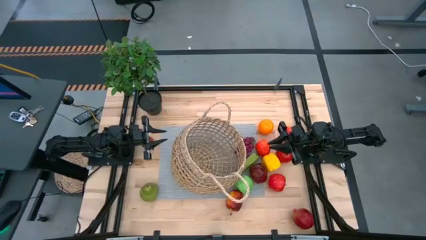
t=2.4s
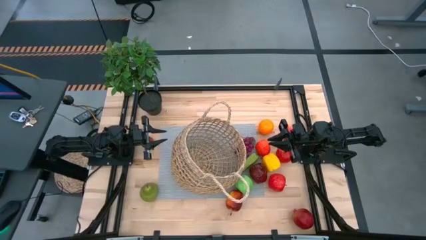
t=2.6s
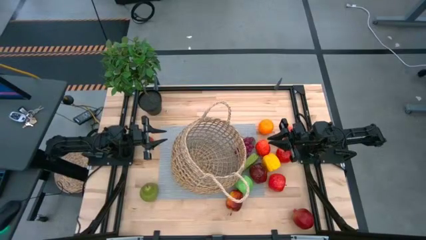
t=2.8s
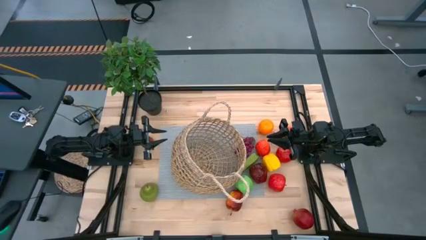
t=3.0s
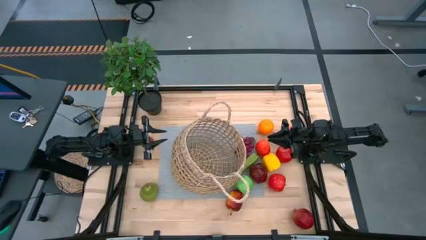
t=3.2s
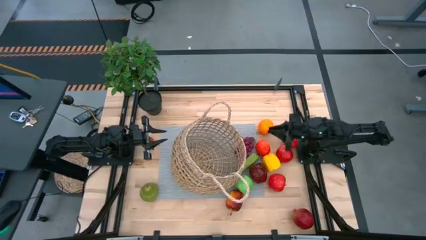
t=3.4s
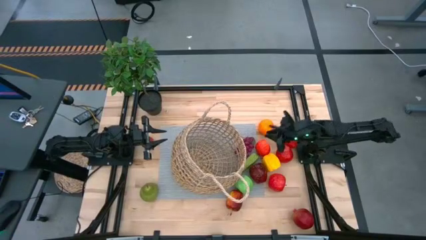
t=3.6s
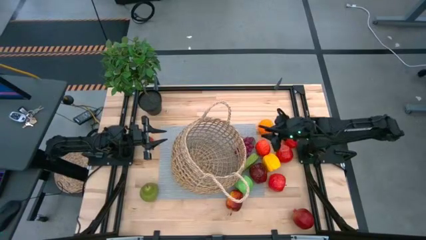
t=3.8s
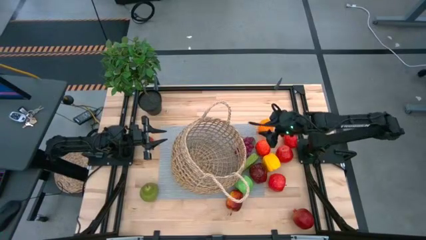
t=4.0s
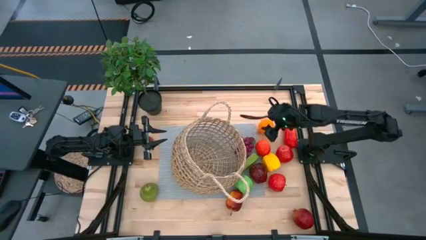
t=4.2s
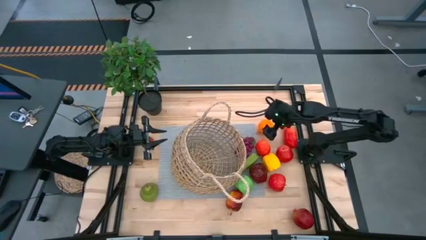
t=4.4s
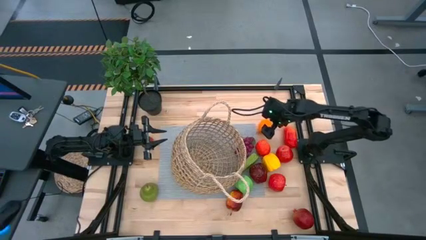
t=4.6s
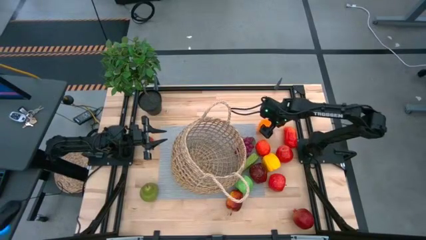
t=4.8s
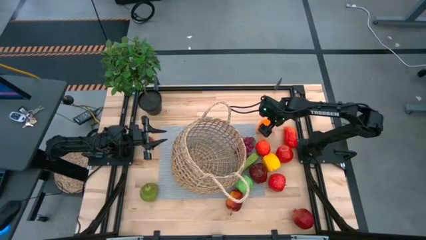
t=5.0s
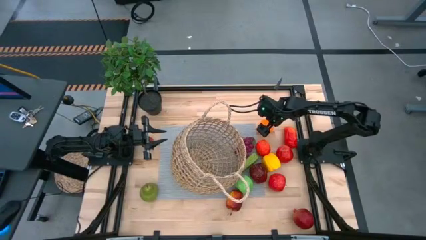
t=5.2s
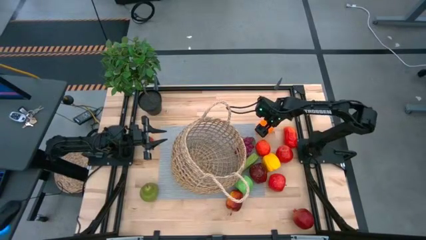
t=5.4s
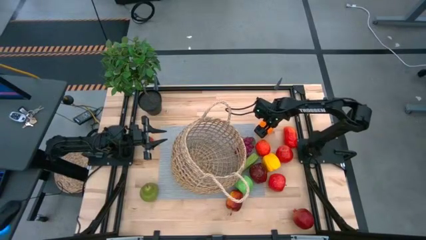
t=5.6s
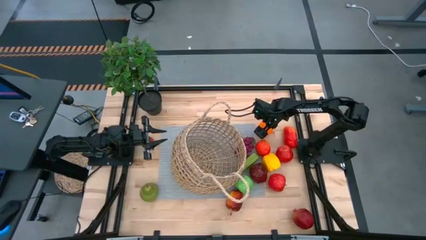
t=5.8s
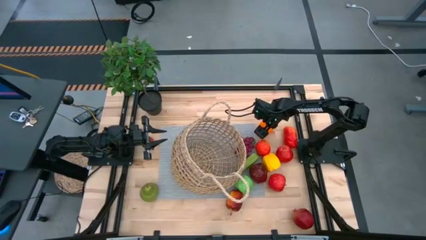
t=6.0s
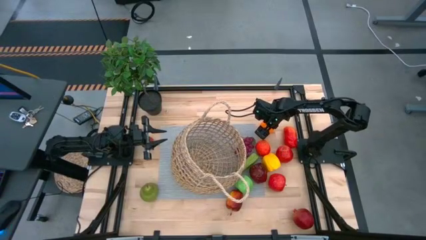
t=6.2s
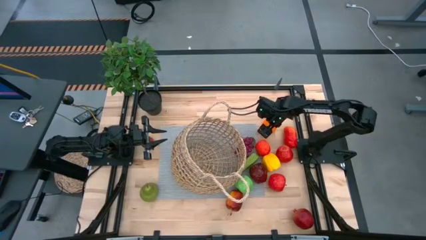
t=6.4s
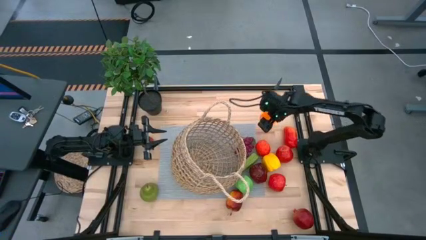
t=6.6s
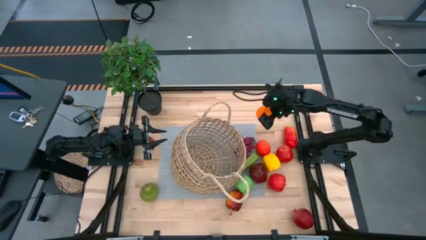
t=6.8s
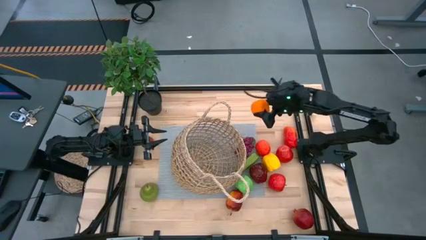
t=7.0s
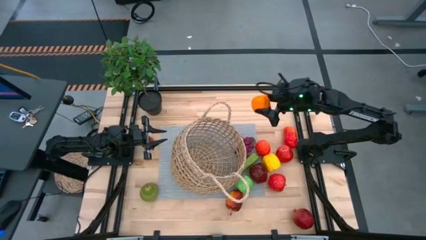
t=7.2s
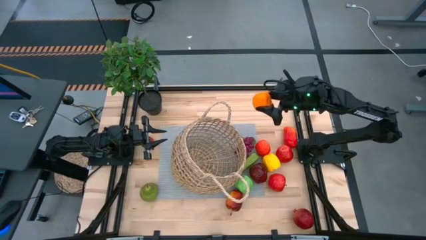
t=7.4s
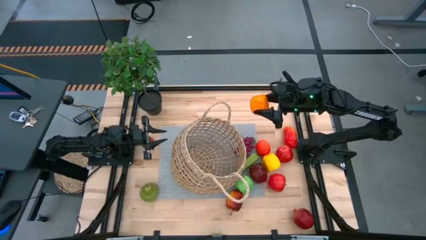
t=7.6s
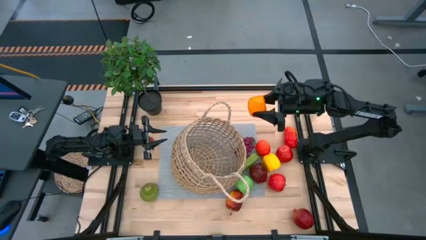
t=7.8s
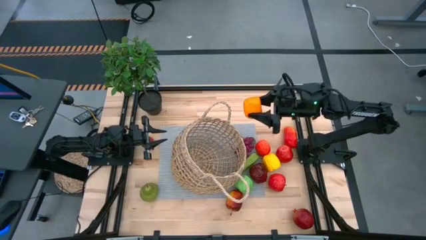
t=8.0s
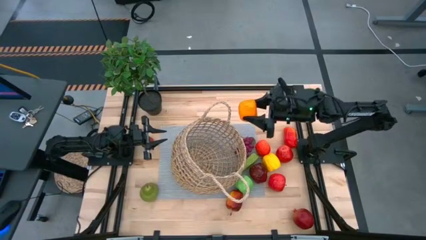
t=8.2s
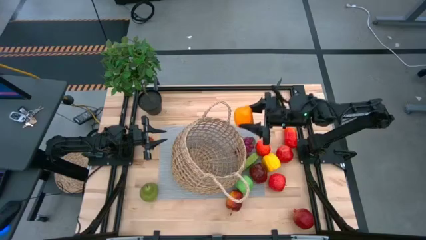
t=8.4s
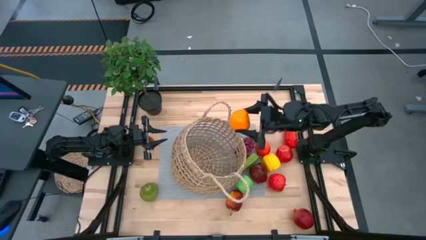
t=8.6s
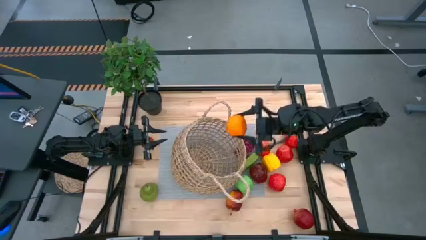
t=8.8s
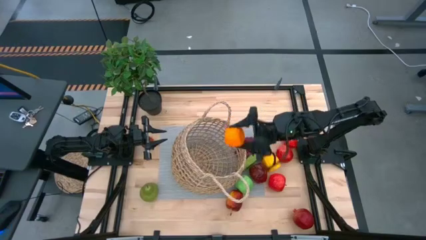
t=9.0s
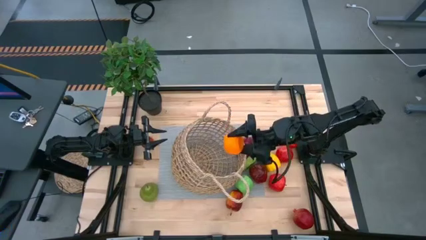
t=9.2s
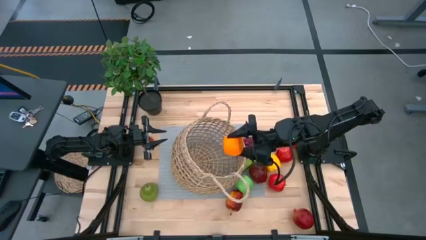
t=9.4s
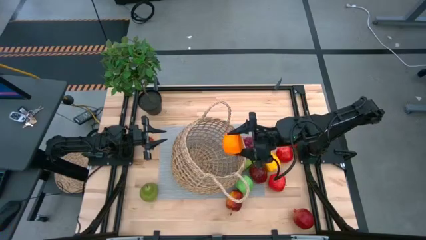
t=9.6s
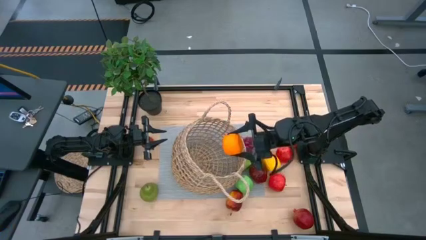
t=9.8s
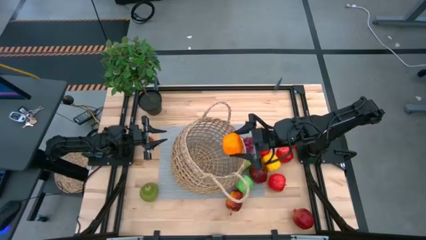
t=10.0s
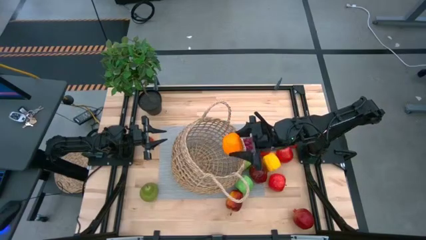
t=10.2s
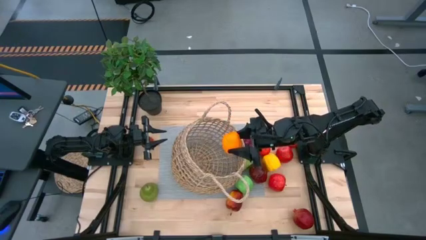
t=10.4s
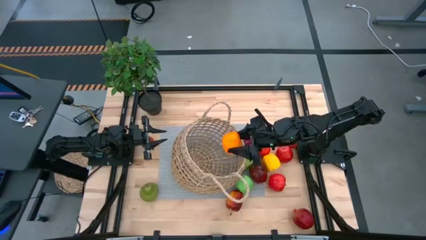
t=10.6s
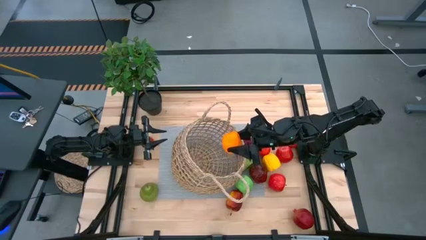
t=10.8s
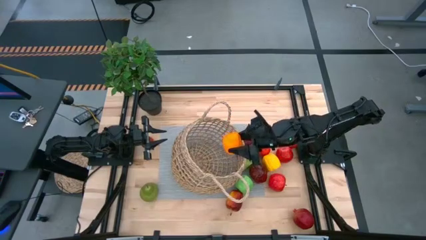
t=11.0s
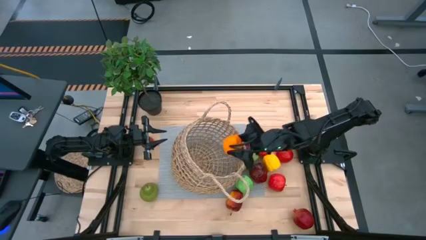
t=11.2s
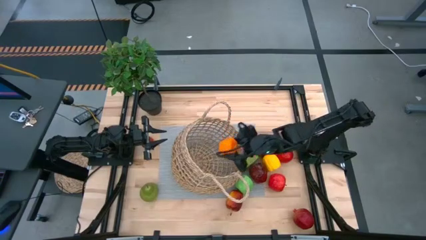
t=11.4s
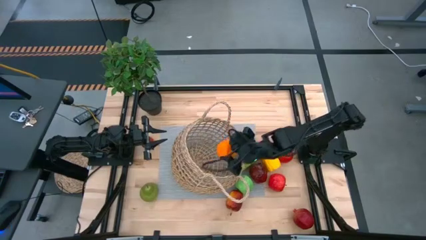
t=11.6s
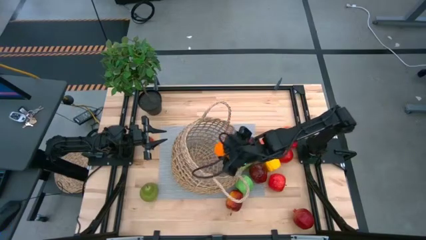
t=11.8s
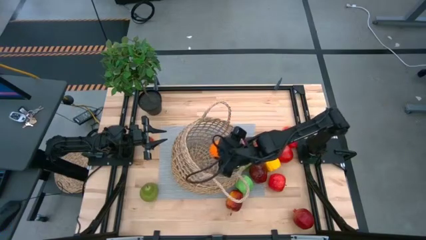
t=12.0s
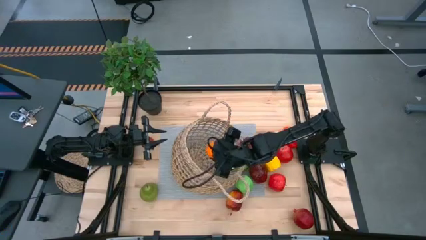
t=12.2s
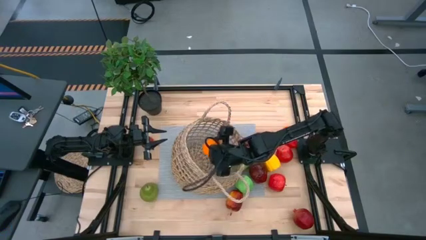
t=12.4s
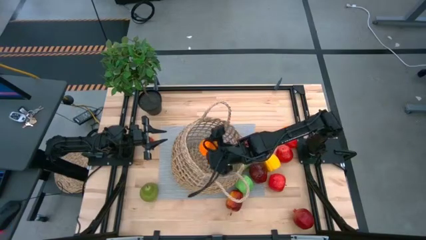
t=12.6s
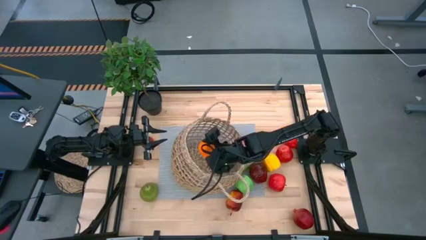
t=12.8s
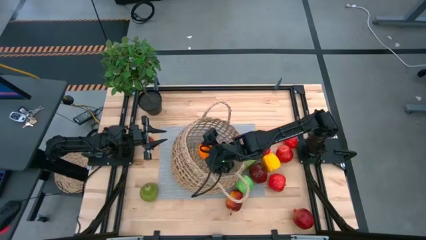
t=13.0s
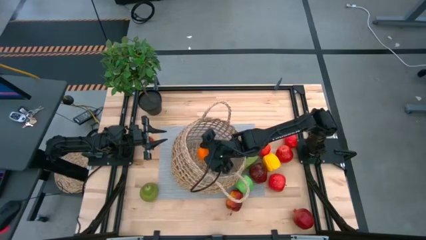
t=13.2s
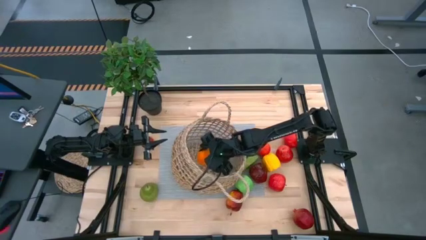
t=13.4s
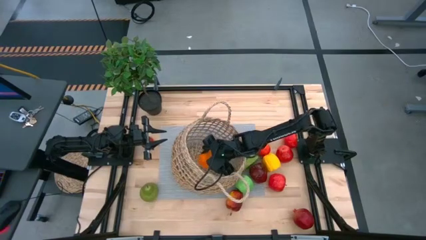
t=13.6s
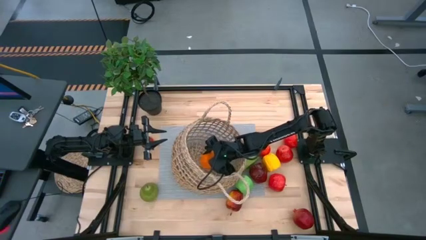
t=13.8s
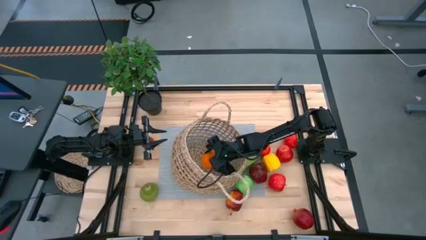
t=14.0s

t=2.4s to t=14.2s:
Task: Build produce basket
Put the orange into the brown basket
